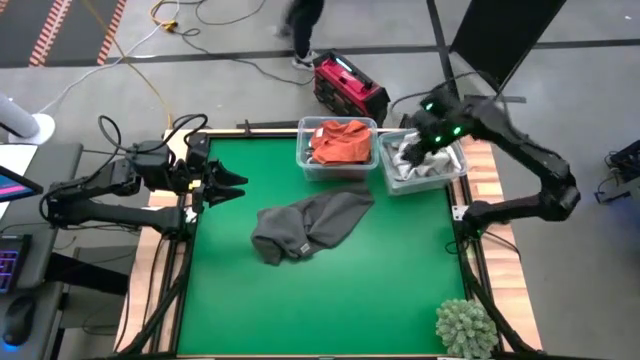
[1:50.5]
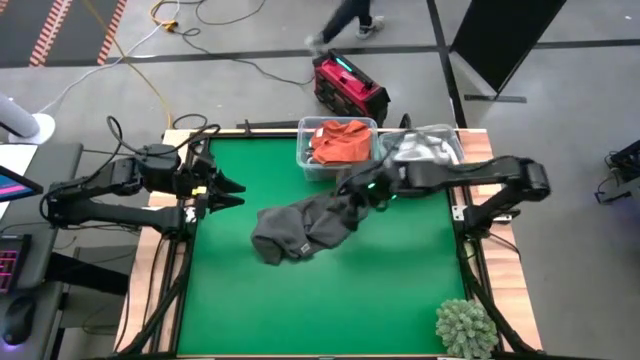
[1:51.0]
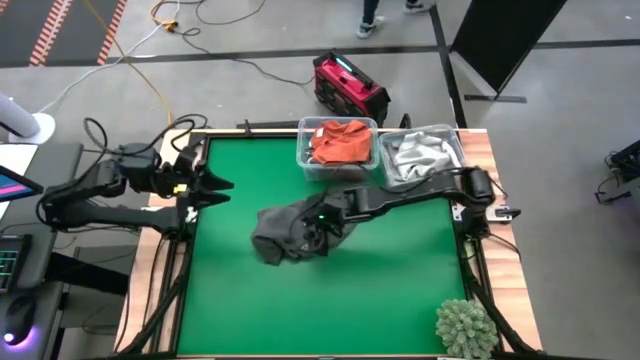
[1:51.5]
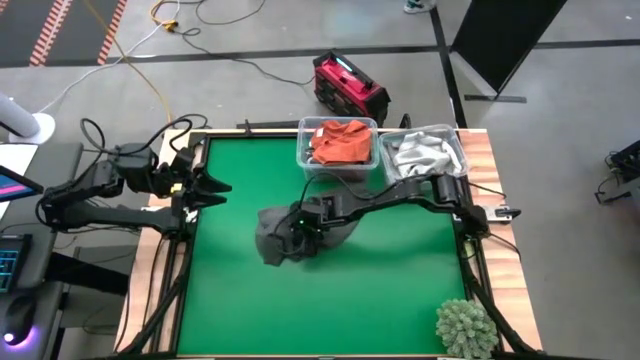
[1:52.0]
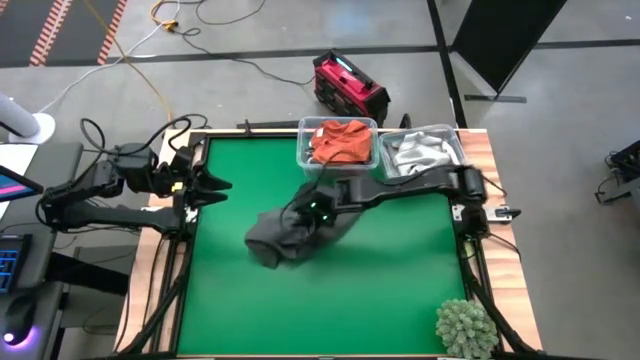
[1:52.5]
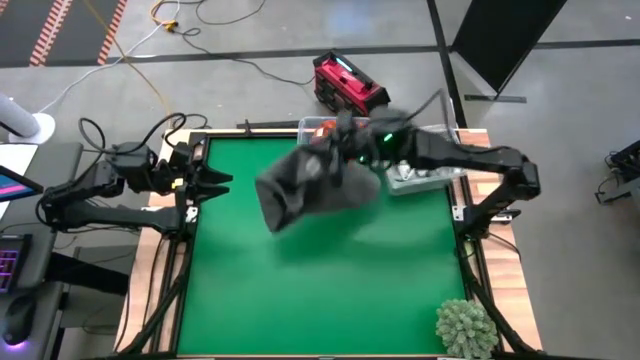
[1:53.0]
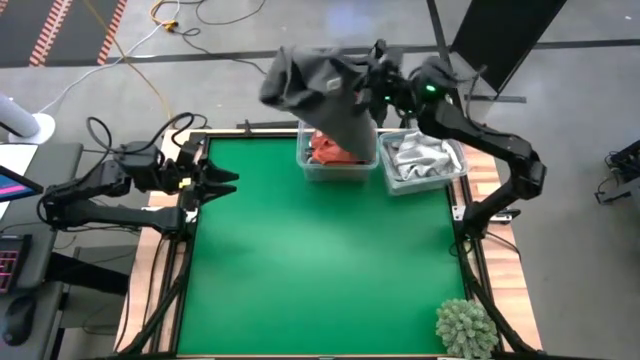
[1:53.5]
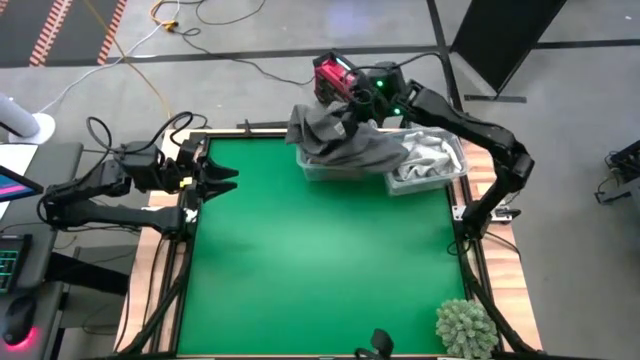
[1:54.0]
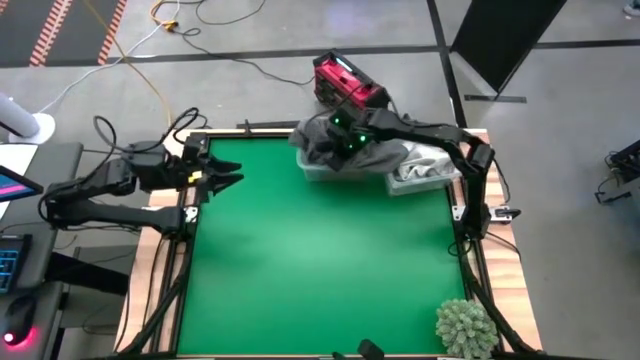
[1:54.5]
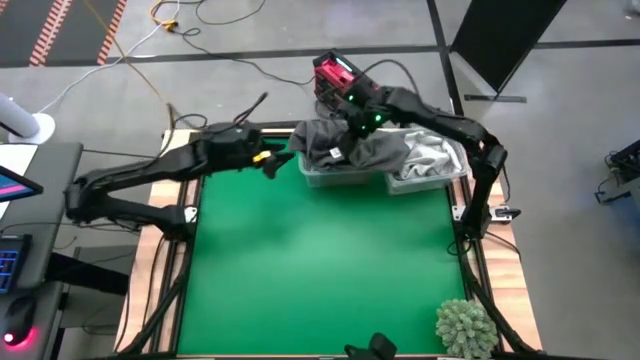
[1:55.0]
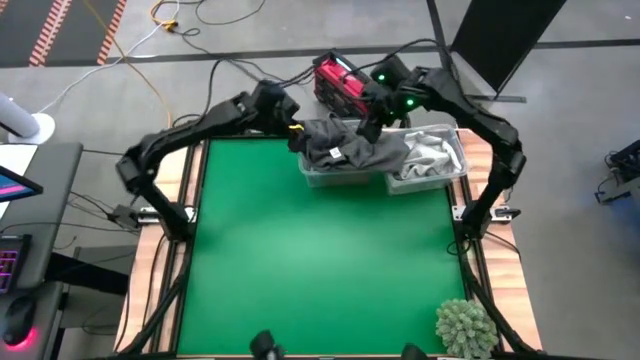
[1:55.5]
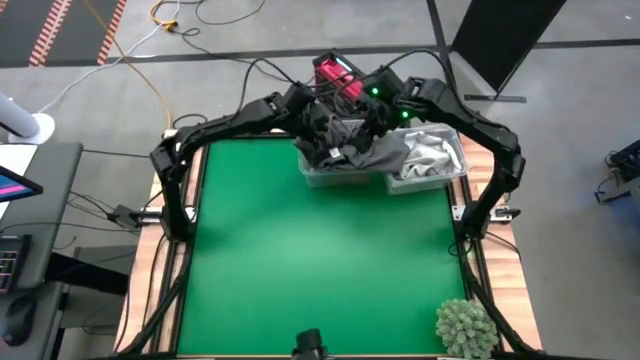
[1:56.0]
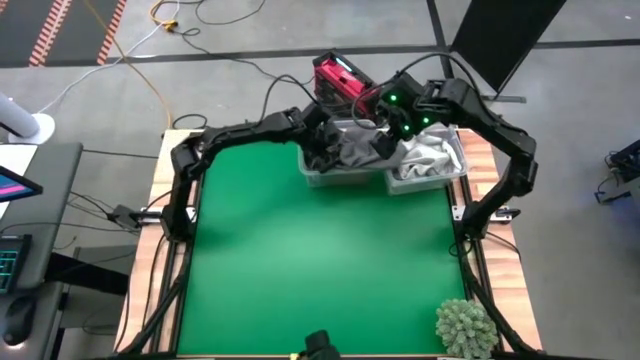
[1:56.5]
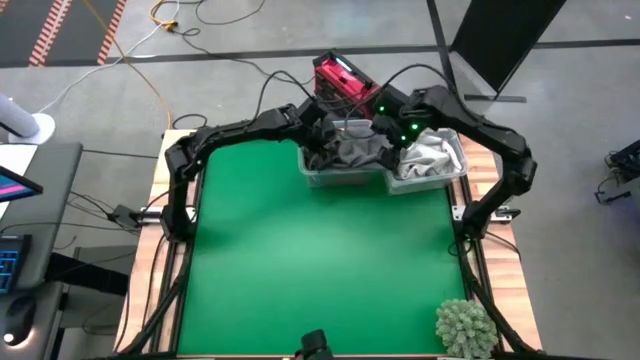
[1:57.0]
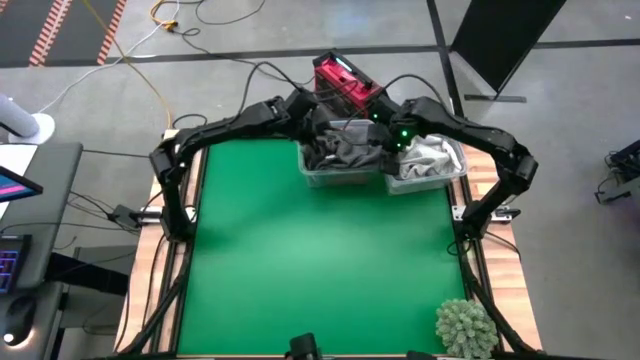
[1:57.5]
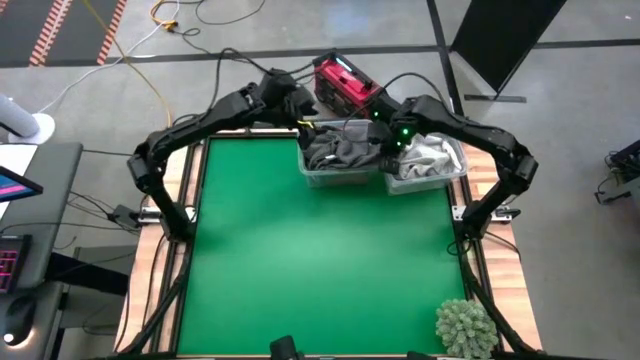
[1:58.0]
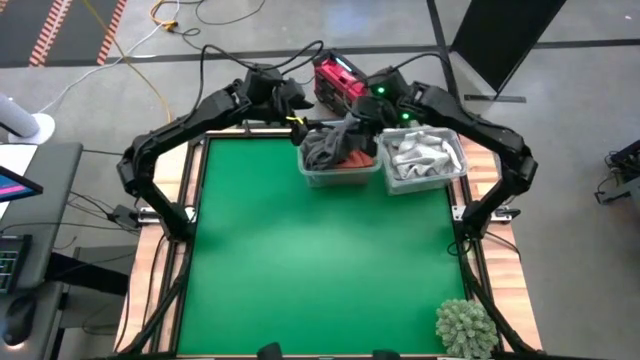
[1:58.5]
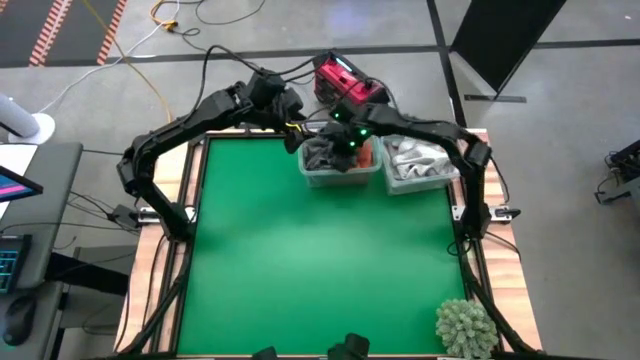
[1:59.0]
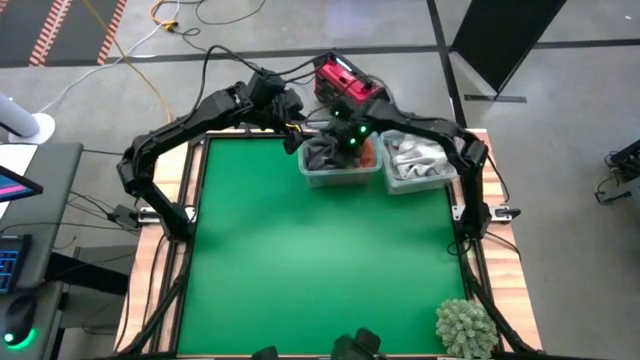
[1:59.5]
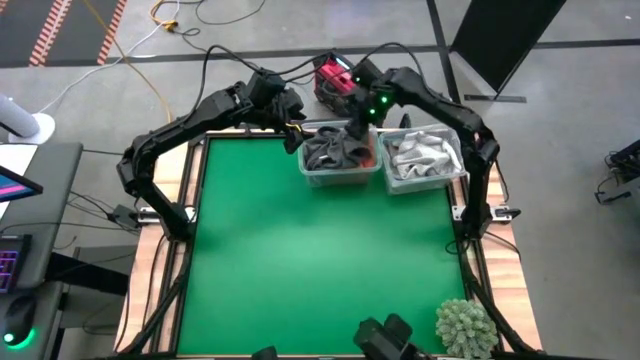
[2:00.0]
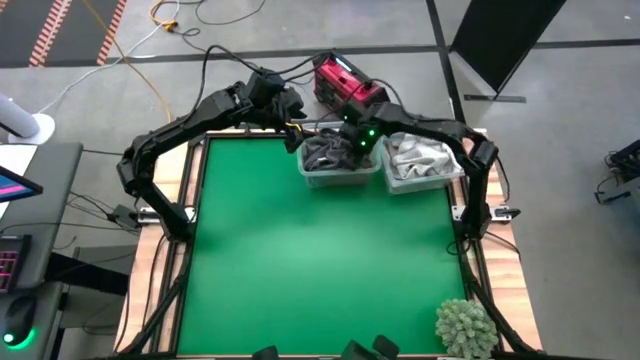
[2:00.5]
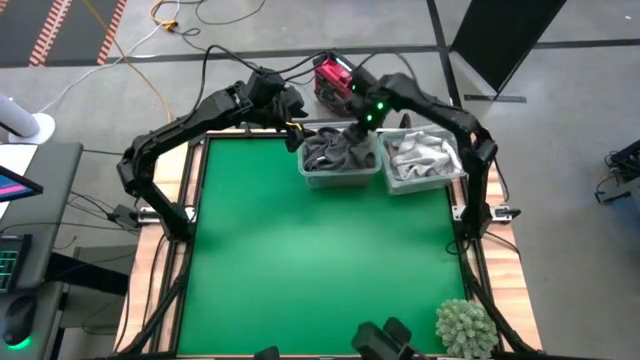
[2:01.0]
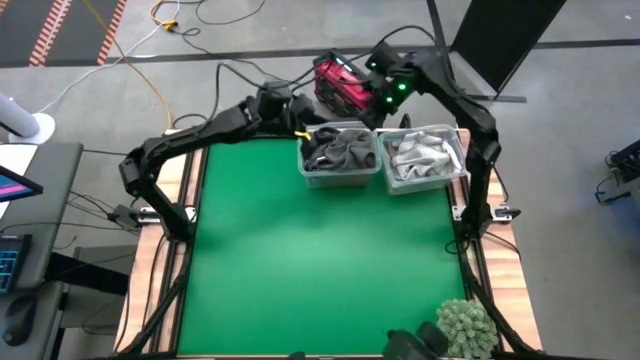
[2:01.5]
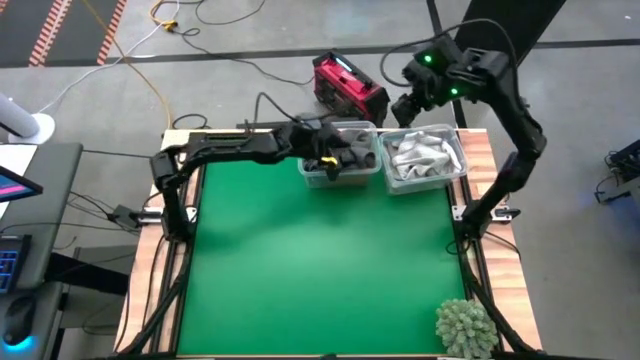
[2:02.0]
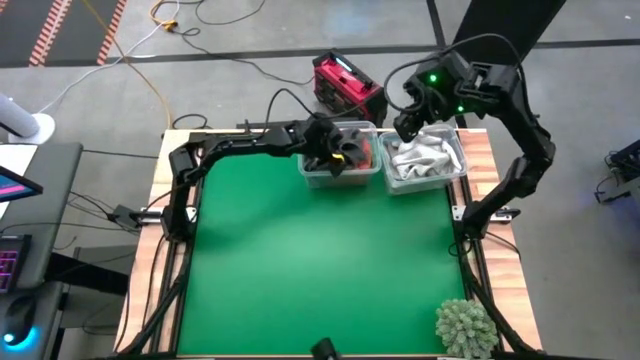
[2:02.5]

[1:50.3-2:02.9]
Task: Sort towels by color in basket
Put the gray towel into the left transparent bin

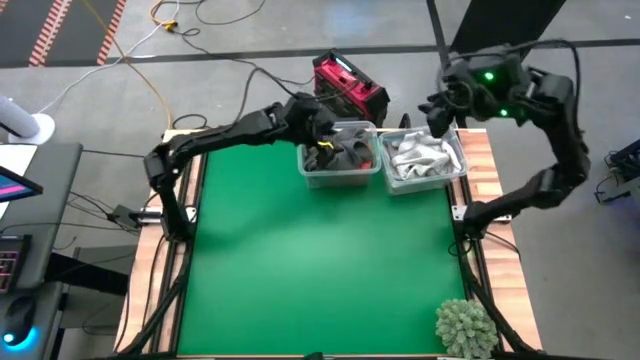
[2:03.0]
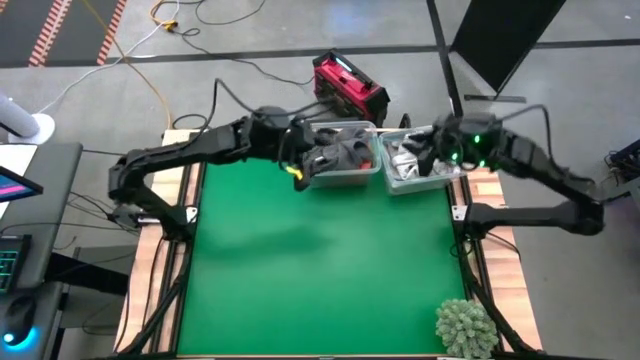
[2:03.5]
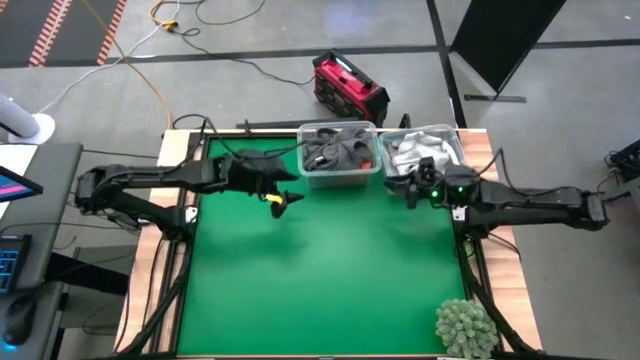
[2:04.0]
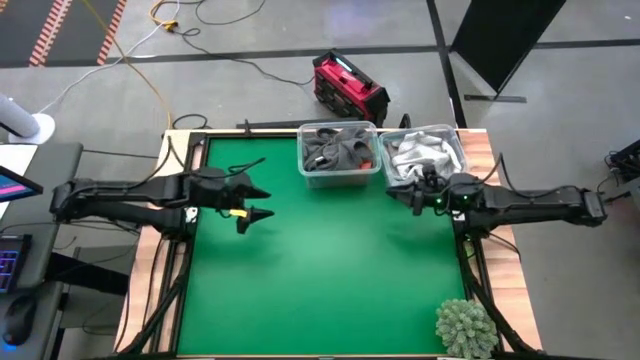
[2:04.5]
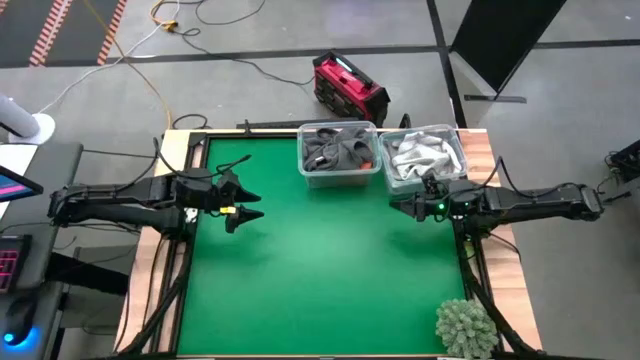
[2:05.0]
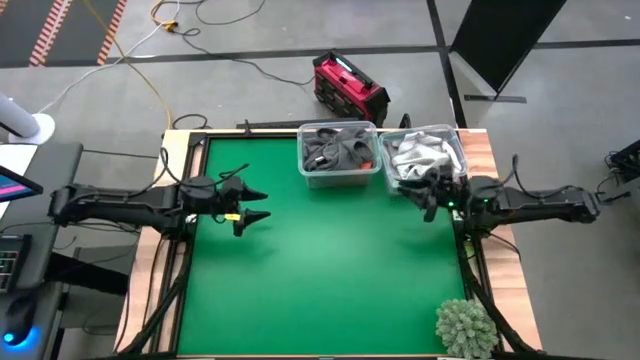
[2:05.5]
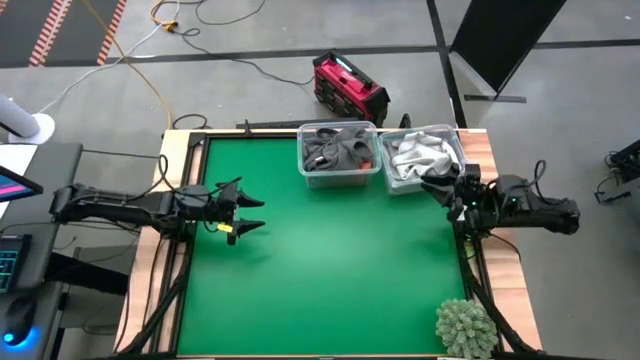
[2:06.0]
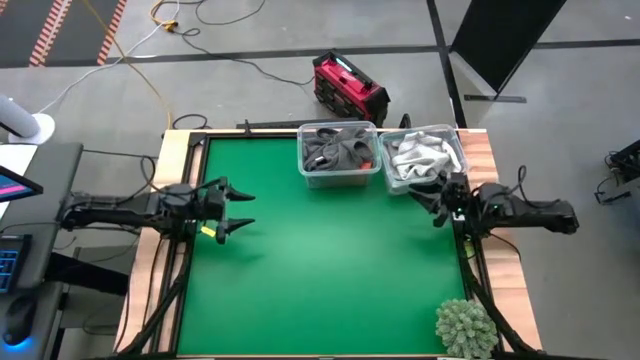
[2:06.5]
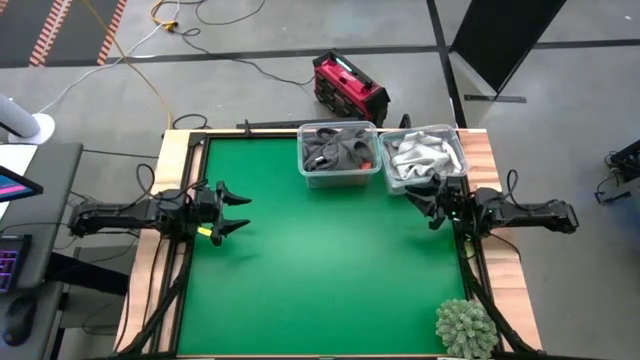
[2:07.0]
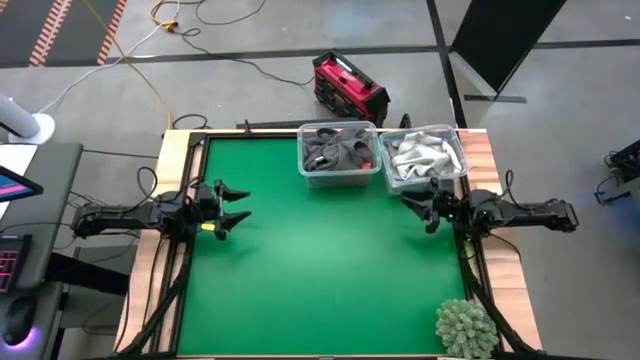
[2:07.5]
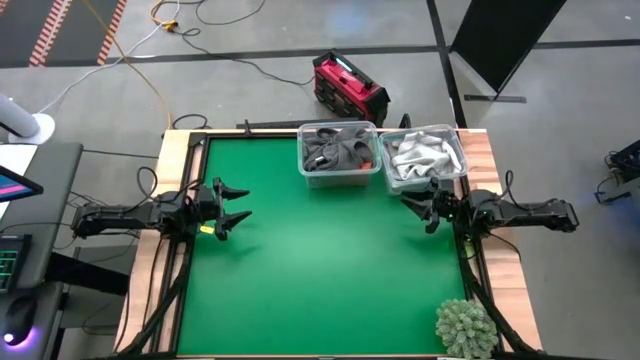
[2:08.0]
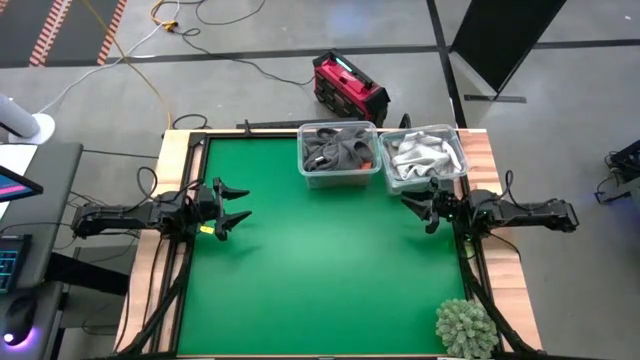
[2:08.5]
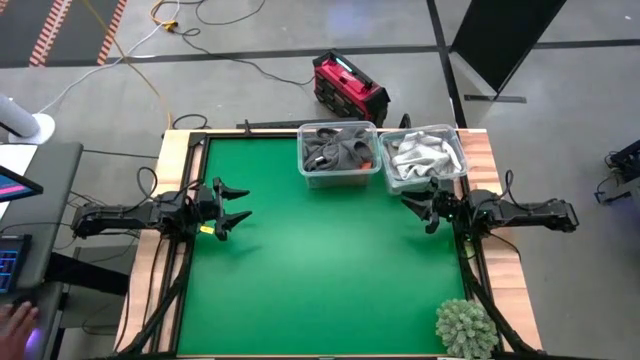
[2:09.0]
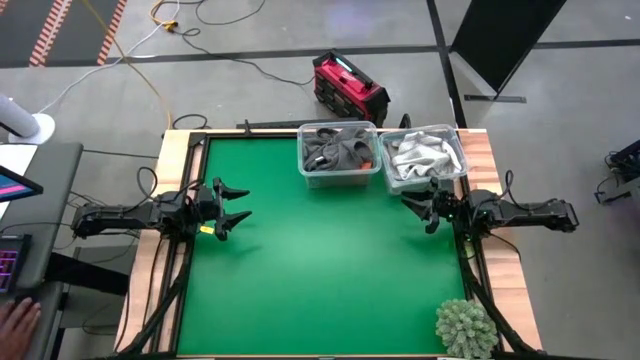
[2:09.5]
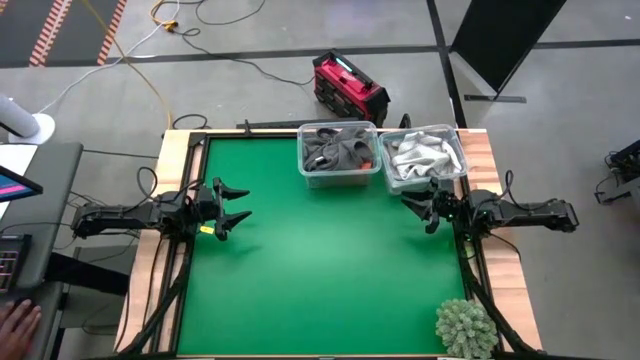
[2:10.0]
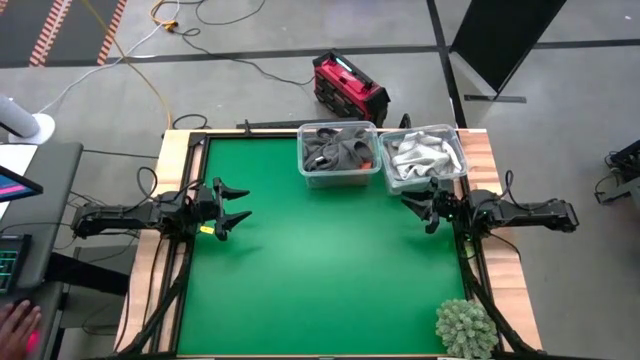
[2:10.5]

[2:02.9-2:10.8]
Return to Home Position
